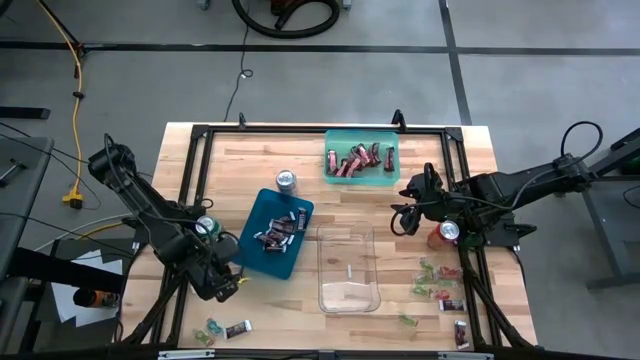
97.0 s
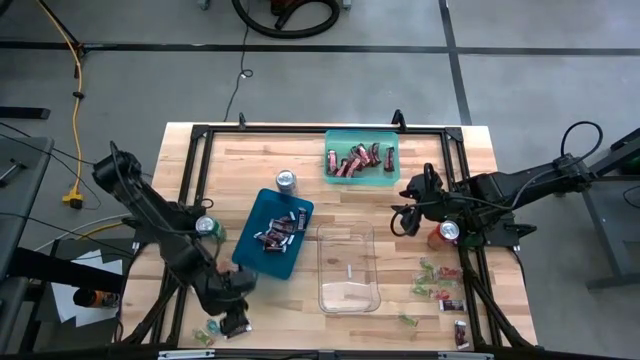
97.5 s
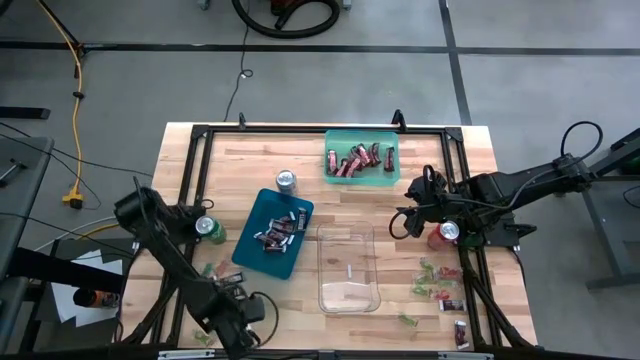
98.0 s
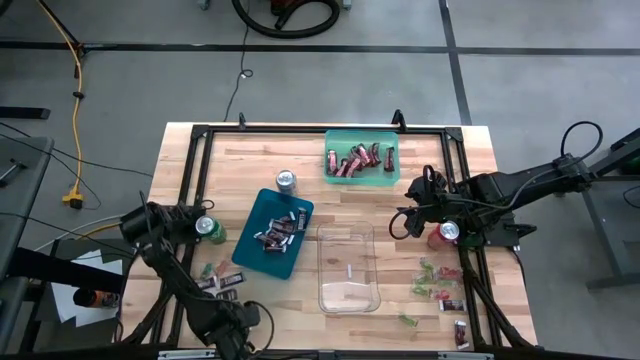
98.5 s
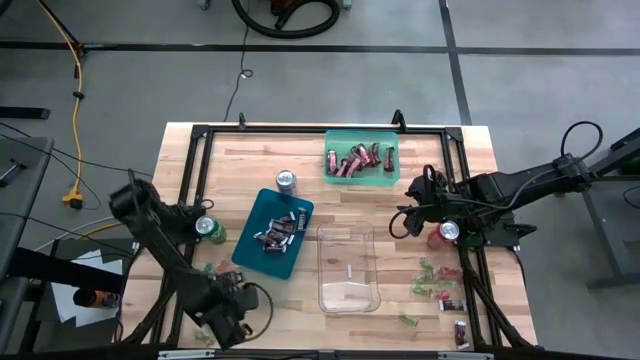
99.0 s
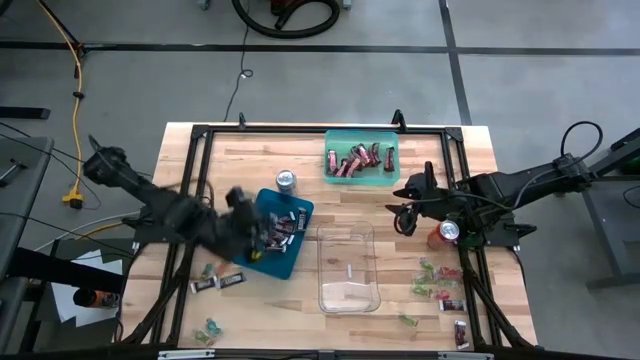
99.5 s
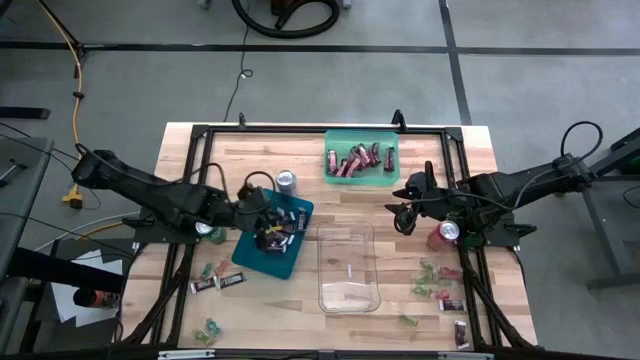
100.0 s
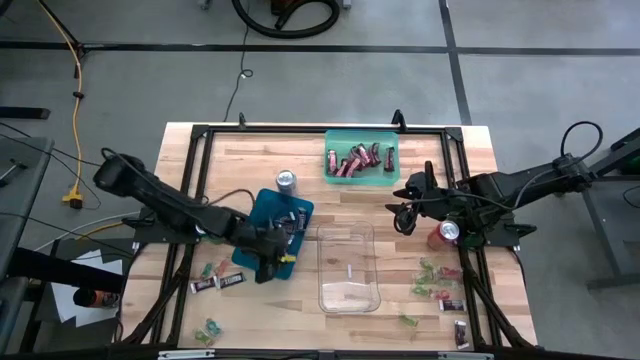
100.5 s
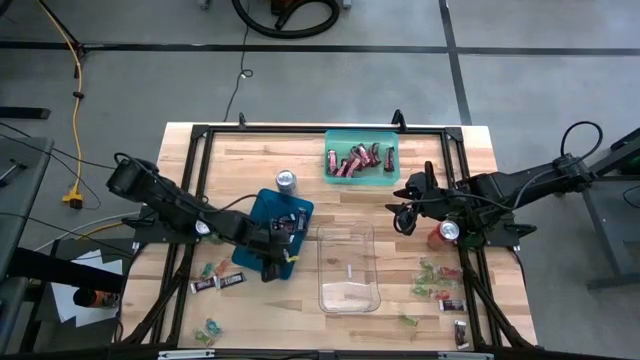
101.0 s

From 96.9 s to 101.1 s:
Task: Sort candy
Put the chocolate bar into the blue bin

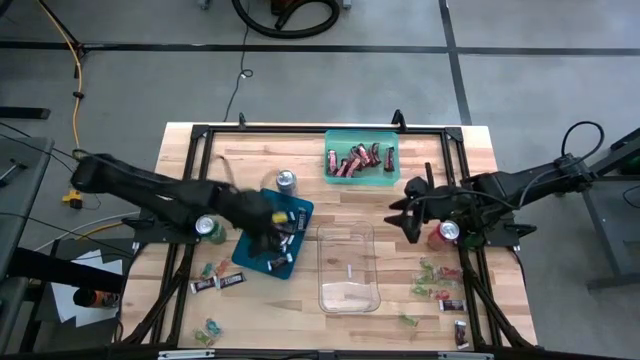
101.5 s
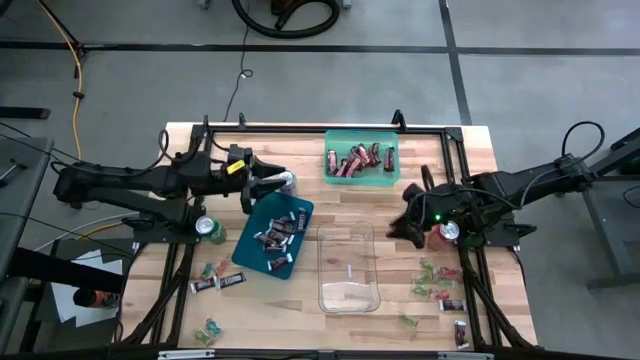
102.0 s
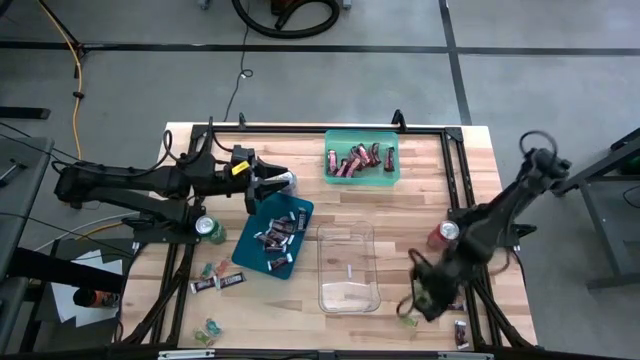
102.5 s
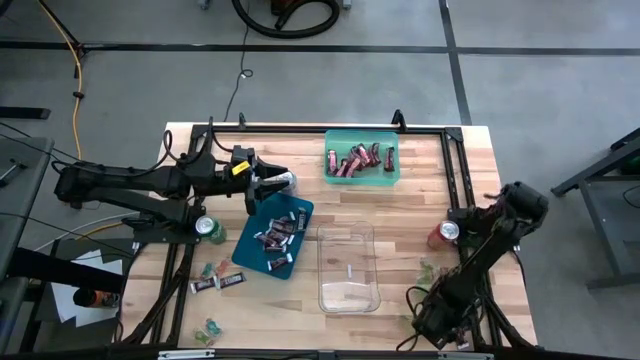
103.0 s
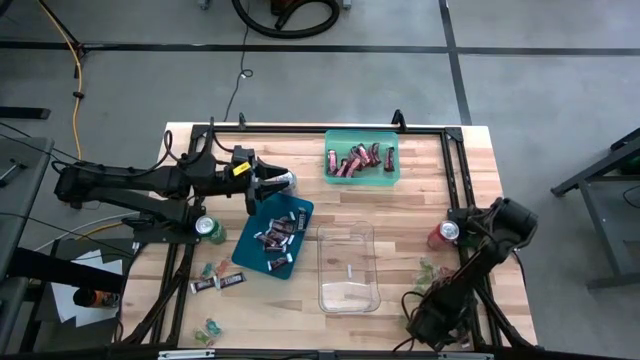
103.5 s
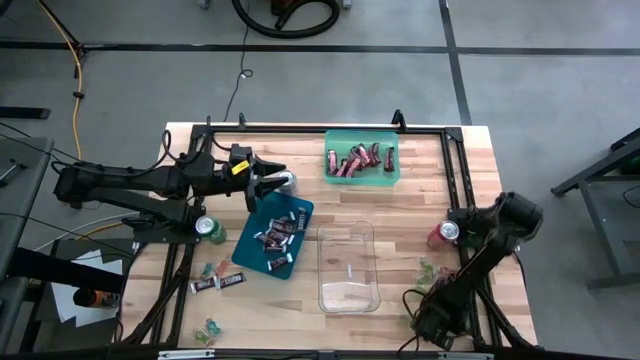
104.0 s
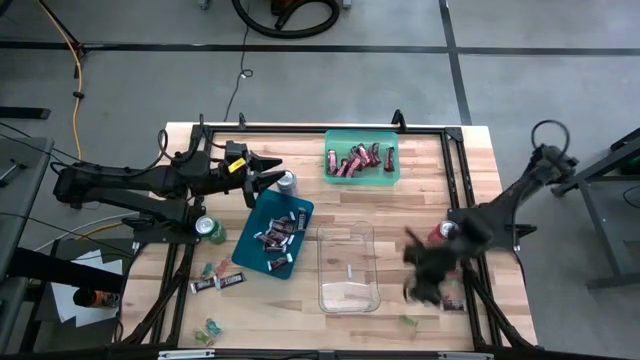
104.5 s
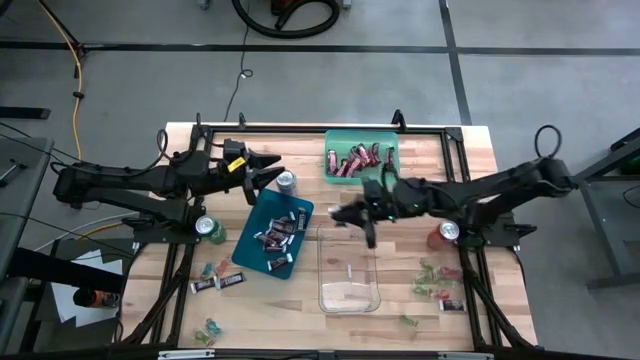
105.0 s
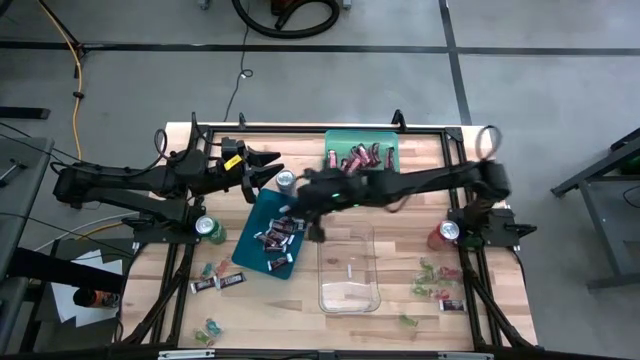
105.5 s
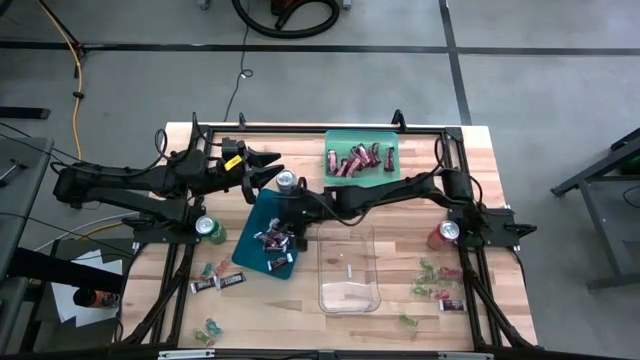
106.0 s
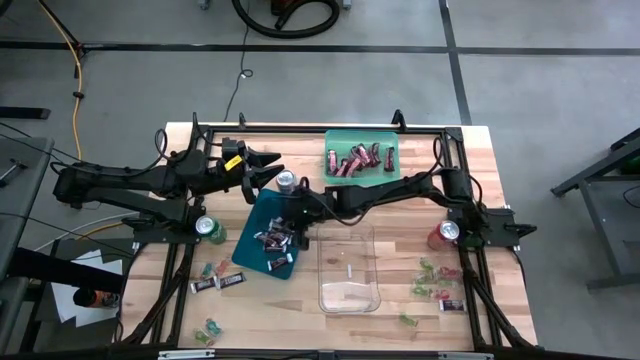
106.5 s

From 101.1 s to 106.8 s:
Put the chocolate bar into the blue bin

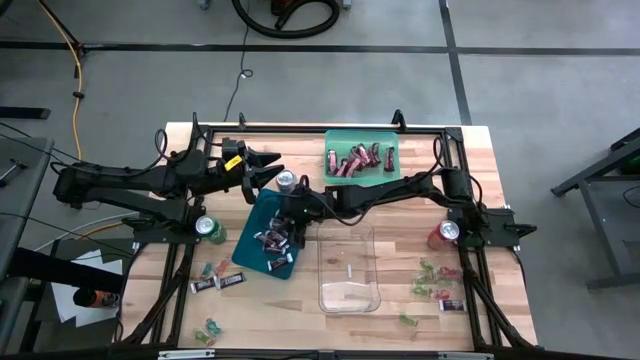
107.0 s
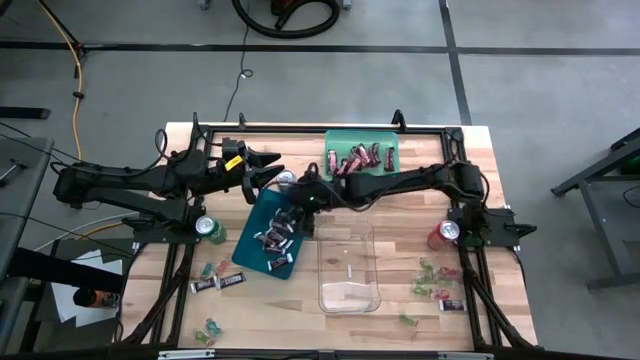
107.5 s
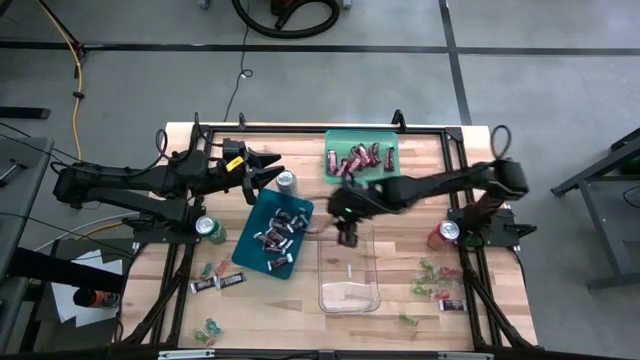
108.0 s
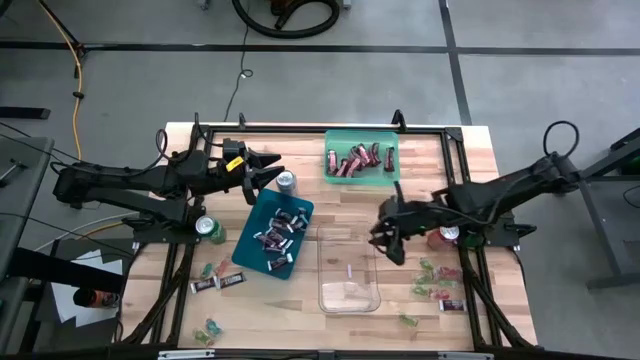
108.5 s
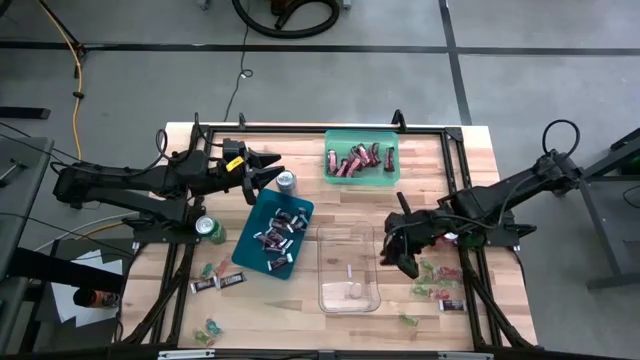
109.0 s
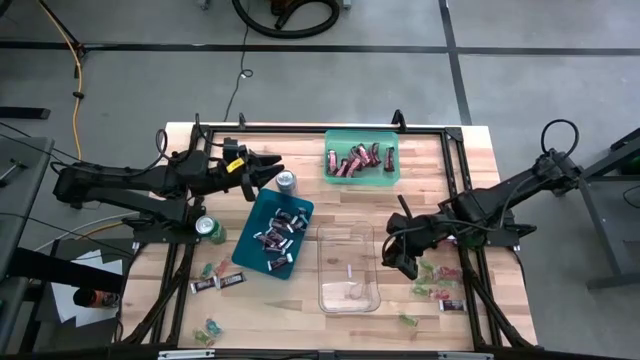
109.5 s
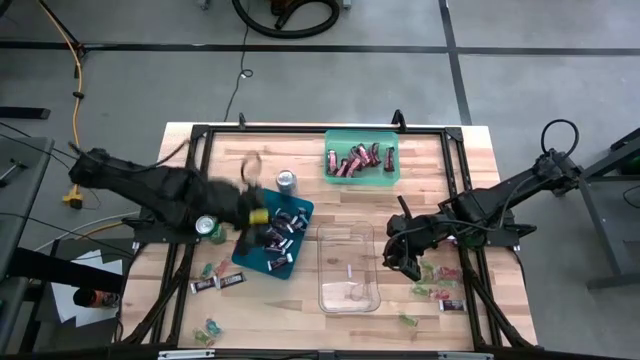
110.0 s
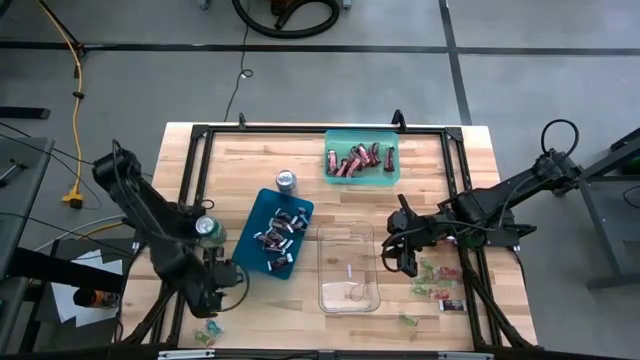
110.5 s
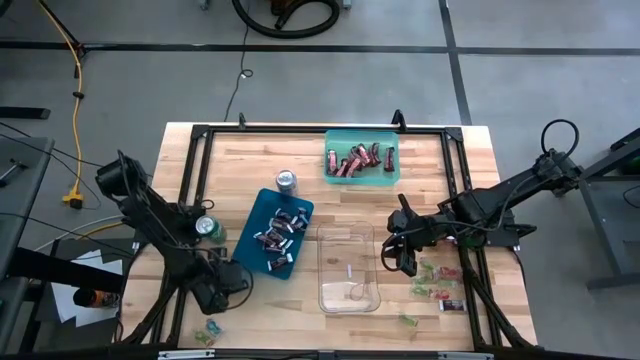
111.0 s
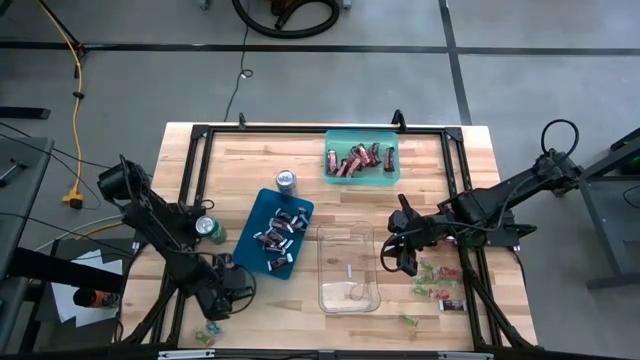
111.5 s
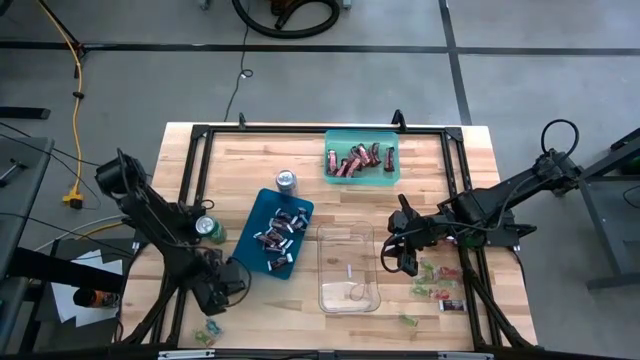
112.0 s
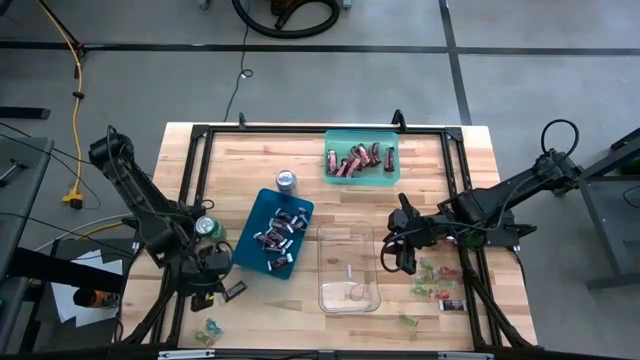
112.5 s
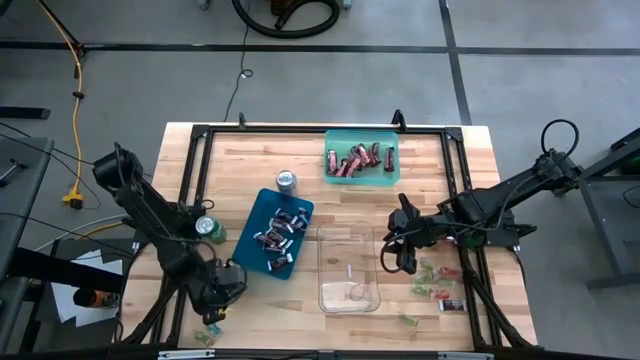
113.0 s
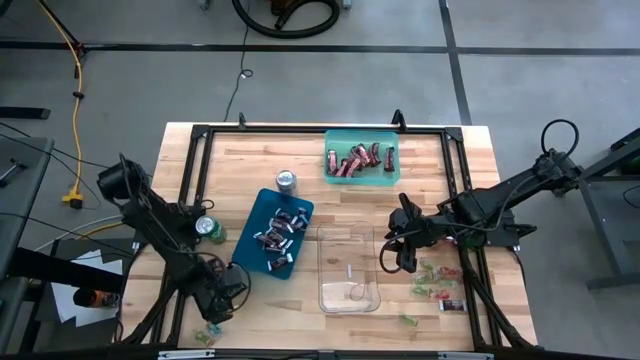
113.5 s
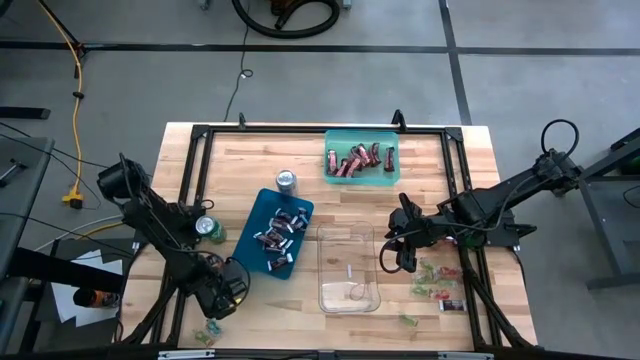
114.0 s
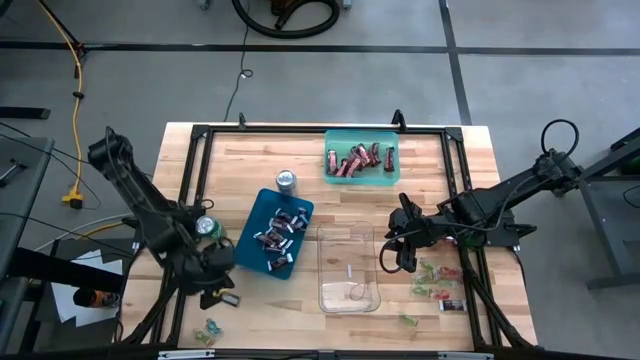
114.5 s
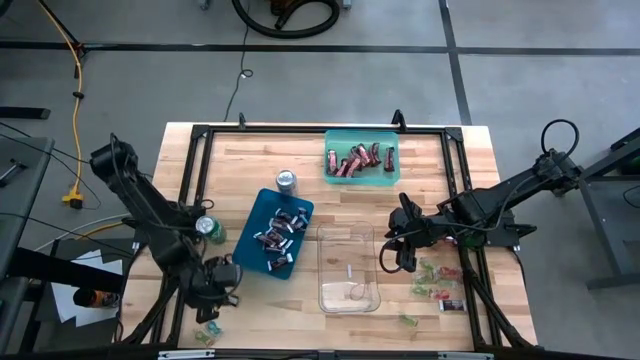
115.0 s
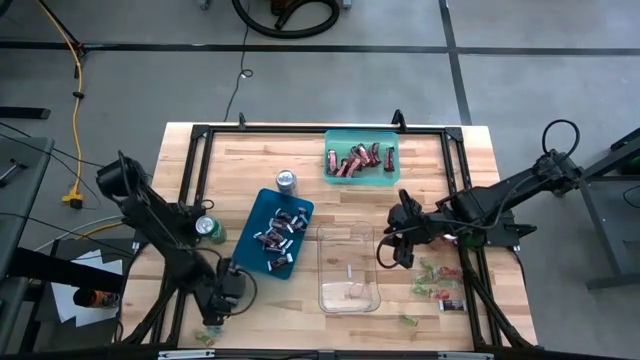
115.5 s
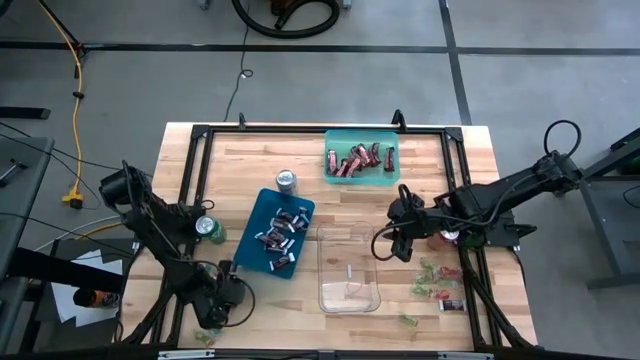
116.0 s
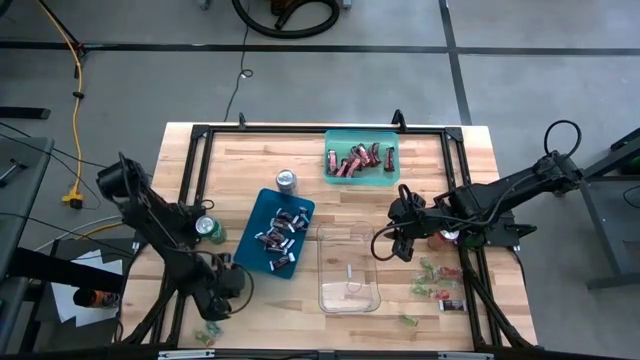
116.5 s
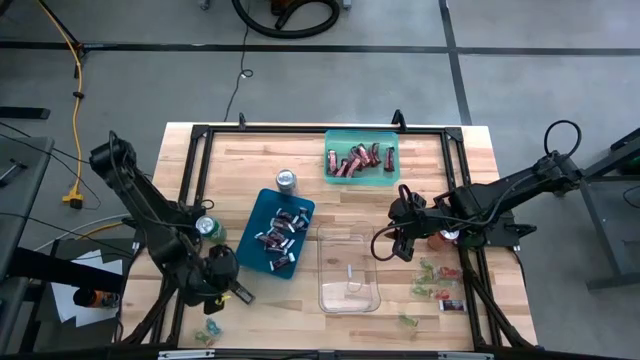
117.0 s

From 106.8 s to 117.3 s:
Put the chocolate bar into the blue bin

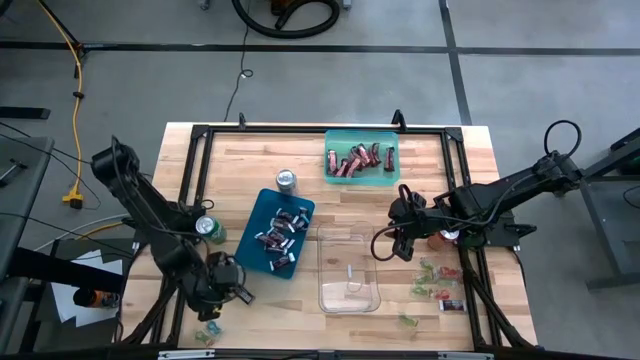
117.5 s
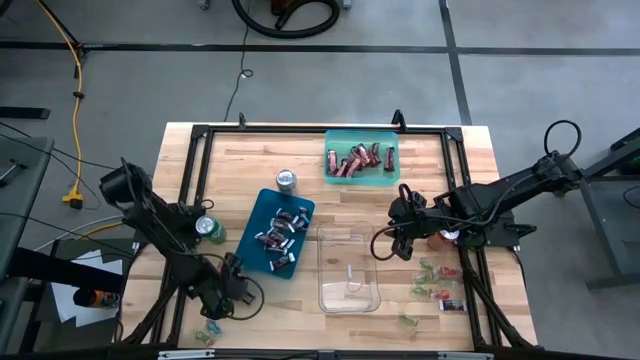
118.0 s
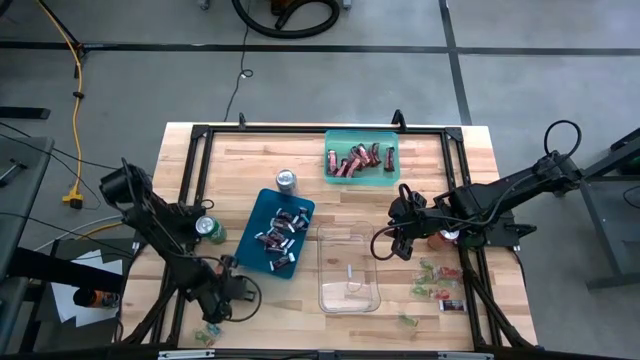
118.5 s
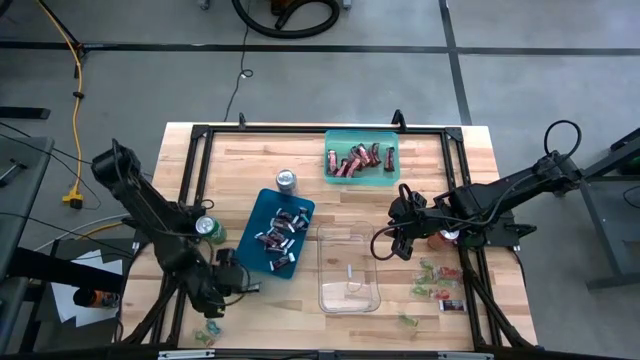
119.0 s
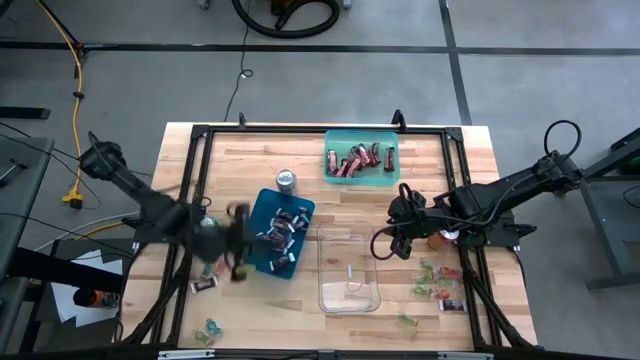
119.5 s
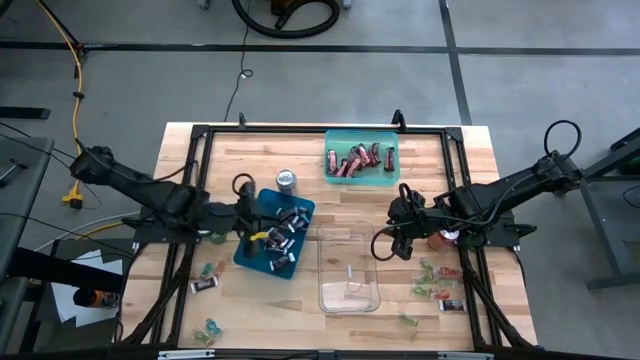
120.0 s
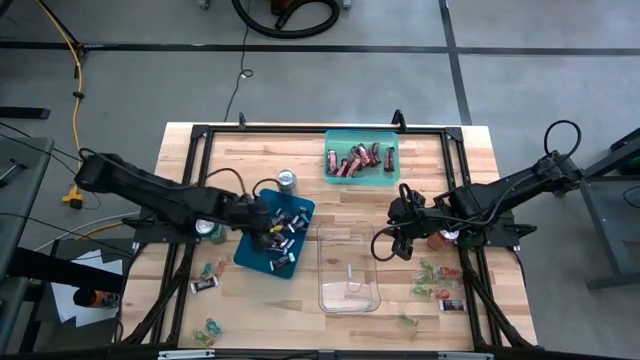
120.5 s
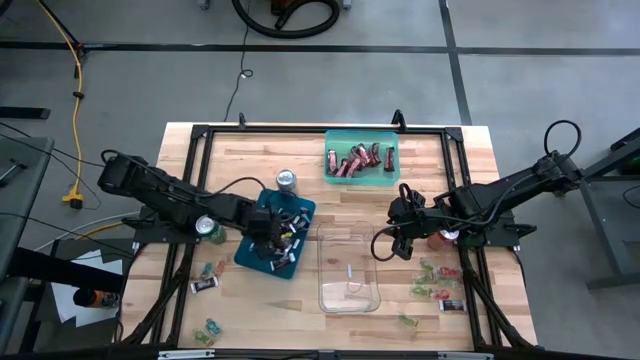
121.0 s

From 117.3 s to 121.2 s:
Put the chocolate bar into the blue bin
